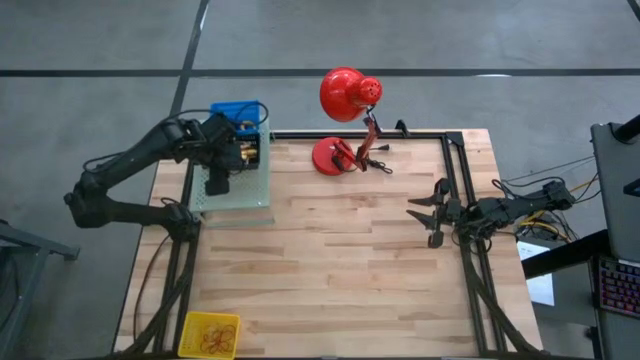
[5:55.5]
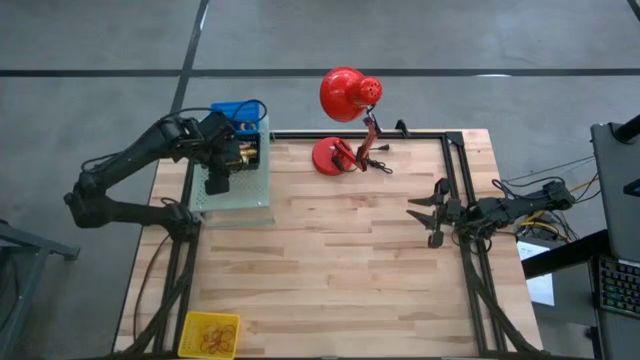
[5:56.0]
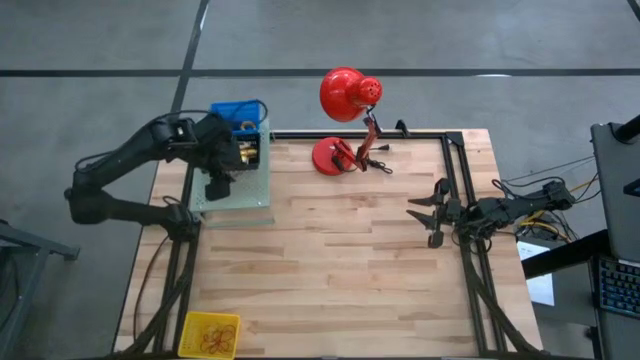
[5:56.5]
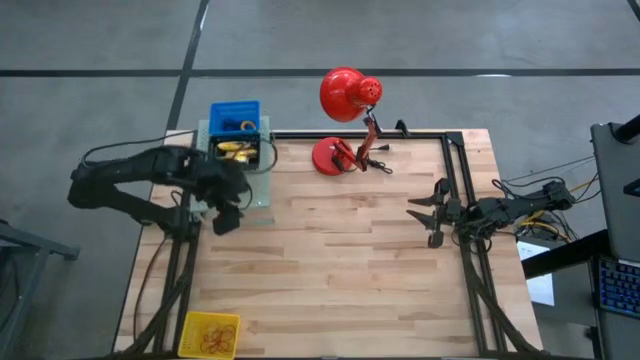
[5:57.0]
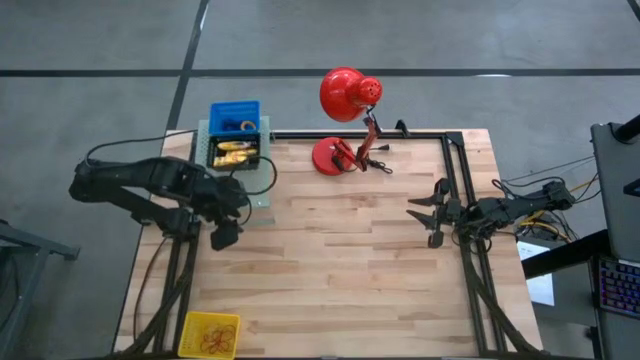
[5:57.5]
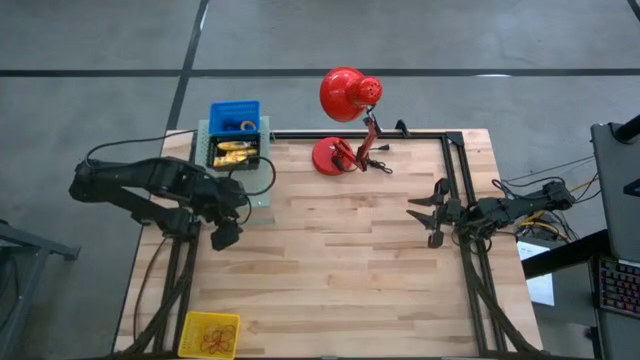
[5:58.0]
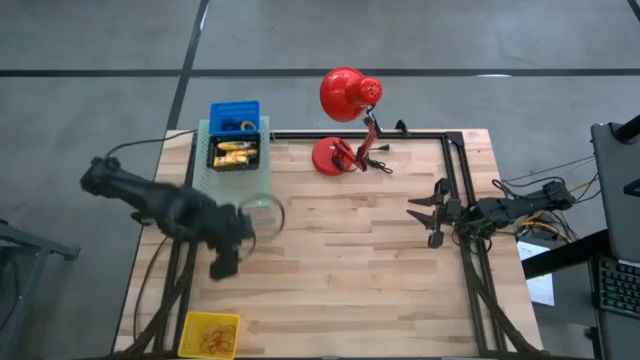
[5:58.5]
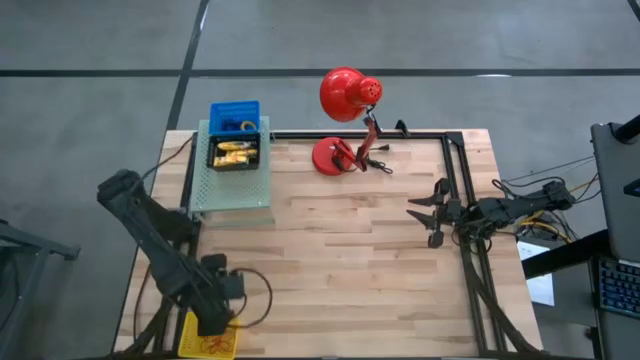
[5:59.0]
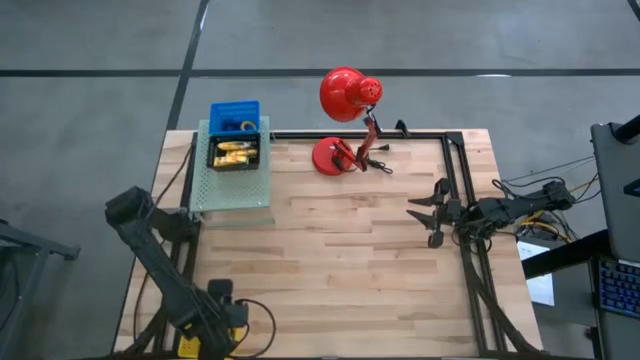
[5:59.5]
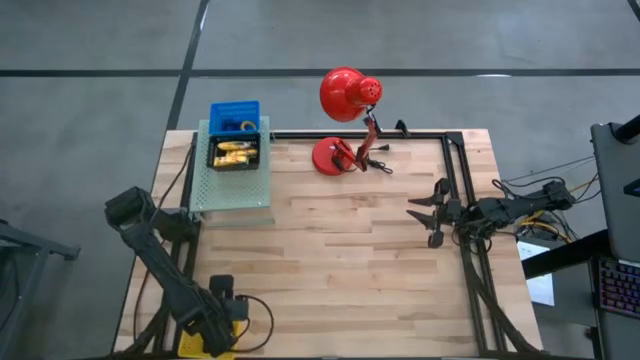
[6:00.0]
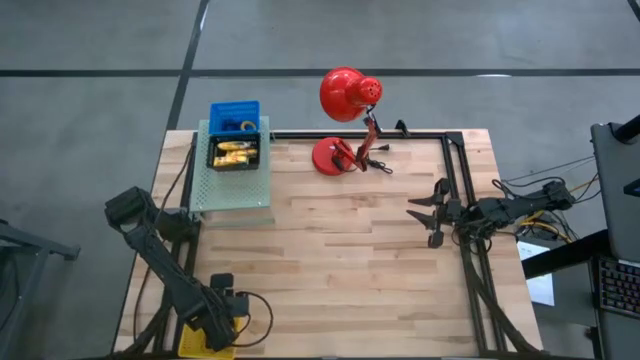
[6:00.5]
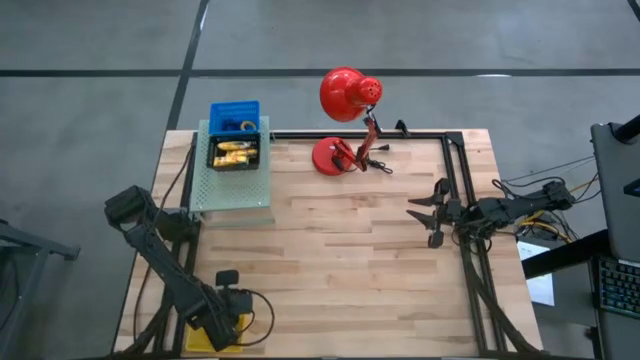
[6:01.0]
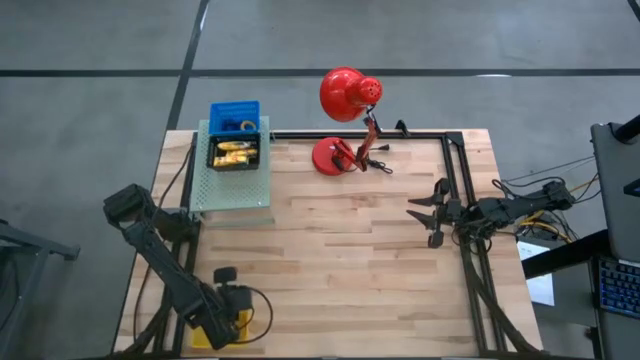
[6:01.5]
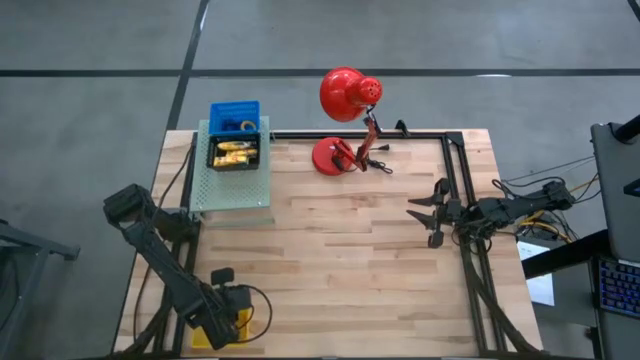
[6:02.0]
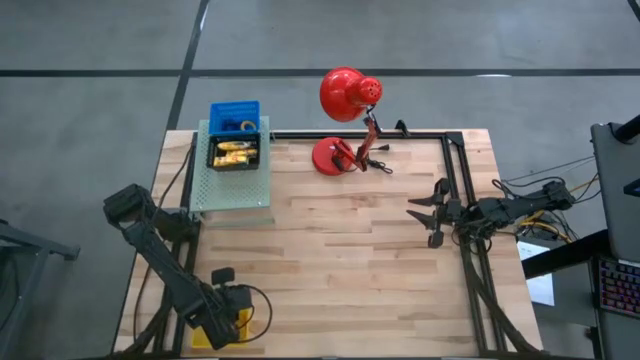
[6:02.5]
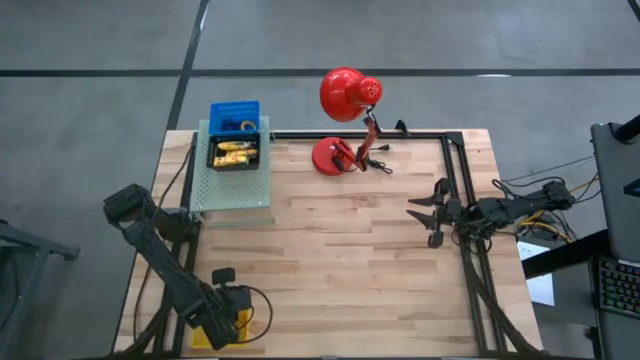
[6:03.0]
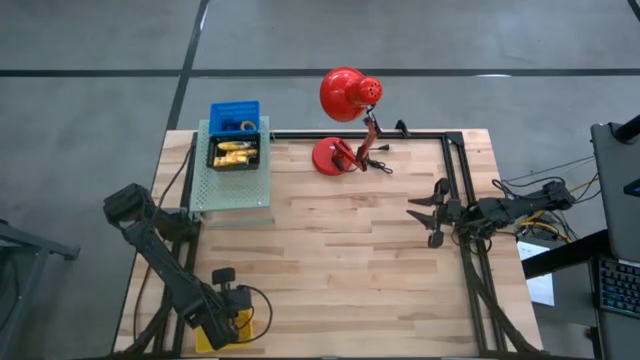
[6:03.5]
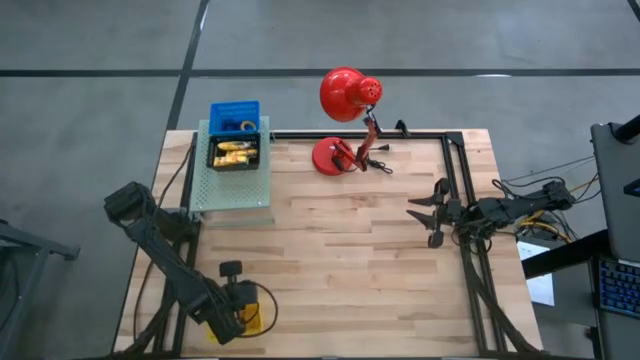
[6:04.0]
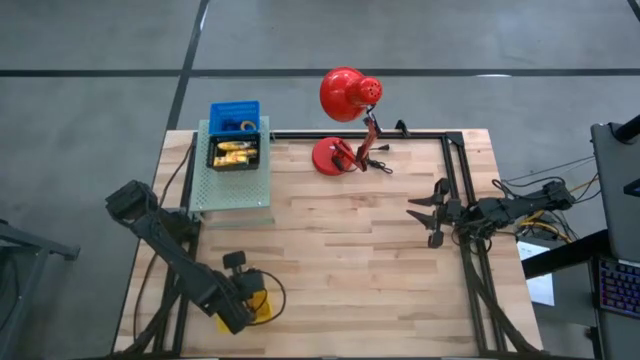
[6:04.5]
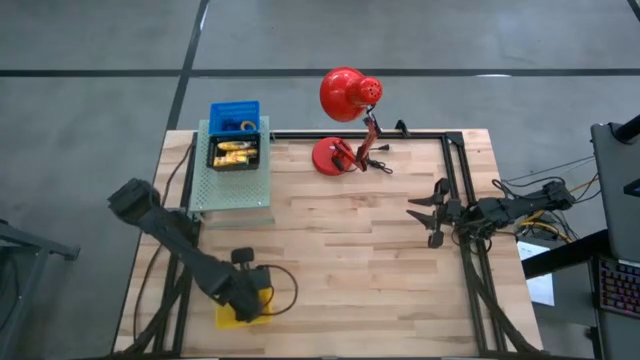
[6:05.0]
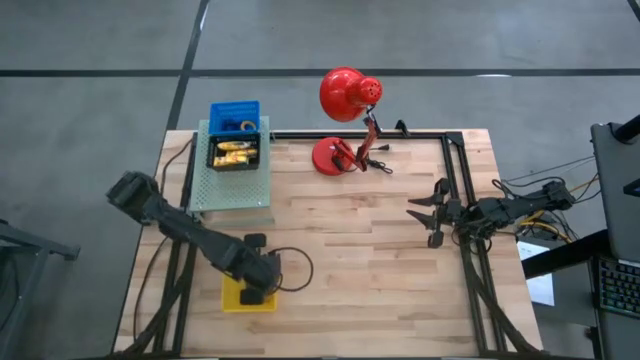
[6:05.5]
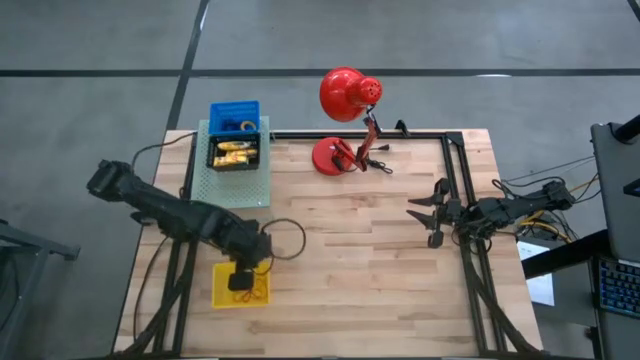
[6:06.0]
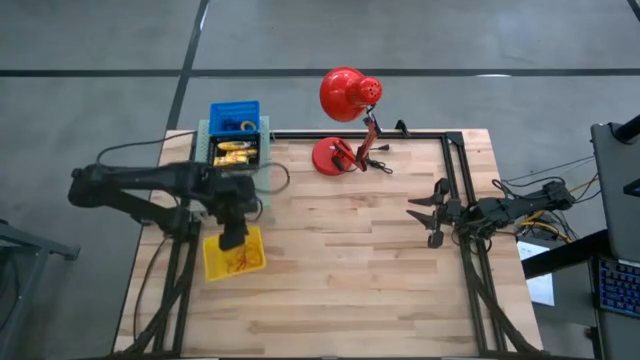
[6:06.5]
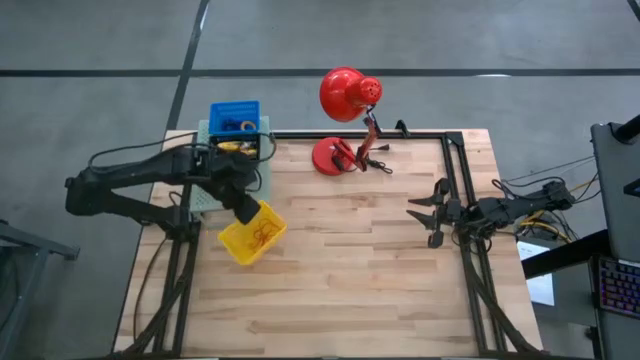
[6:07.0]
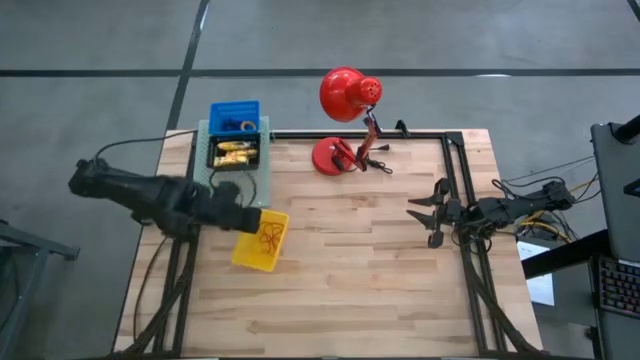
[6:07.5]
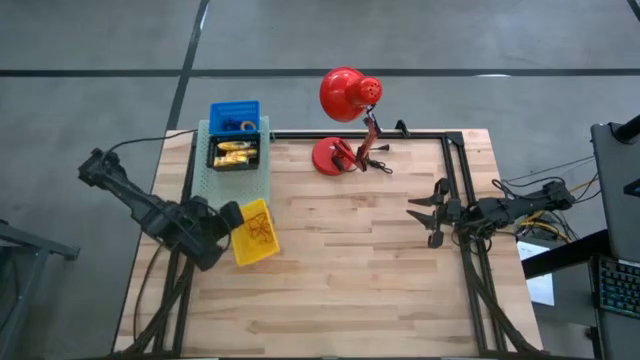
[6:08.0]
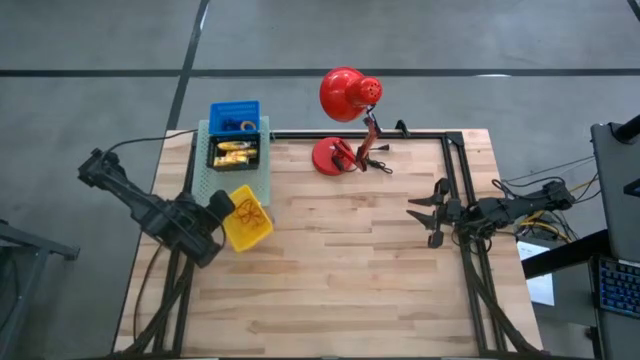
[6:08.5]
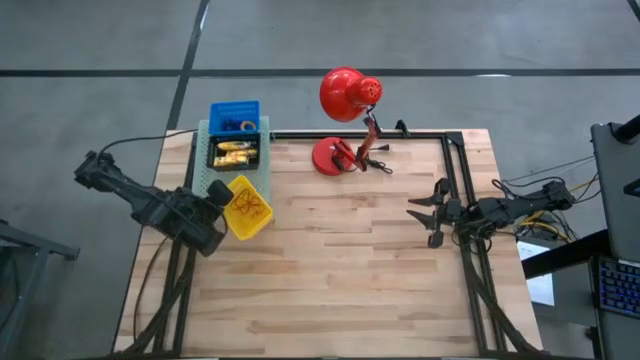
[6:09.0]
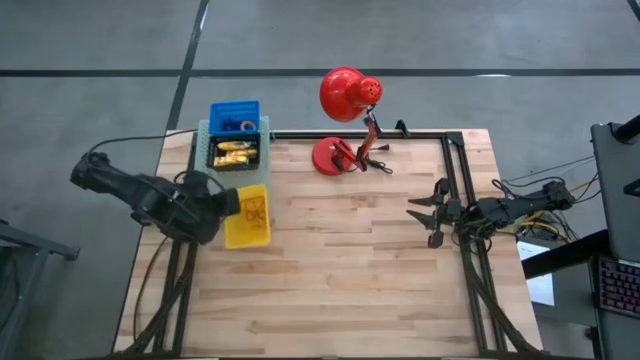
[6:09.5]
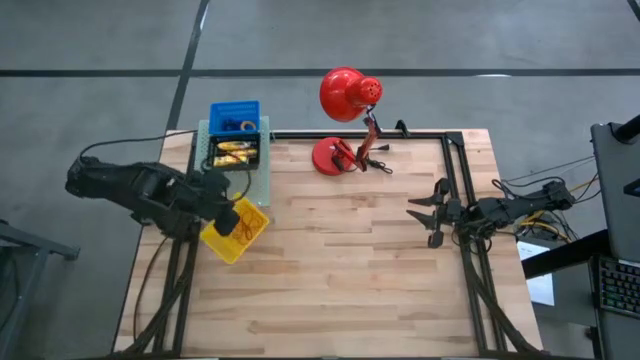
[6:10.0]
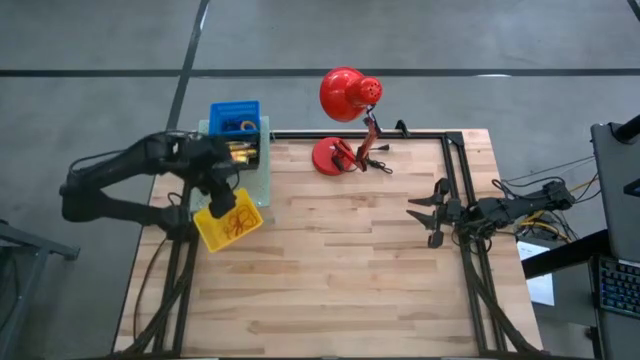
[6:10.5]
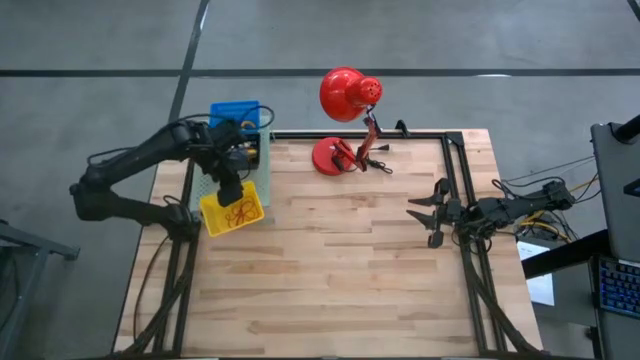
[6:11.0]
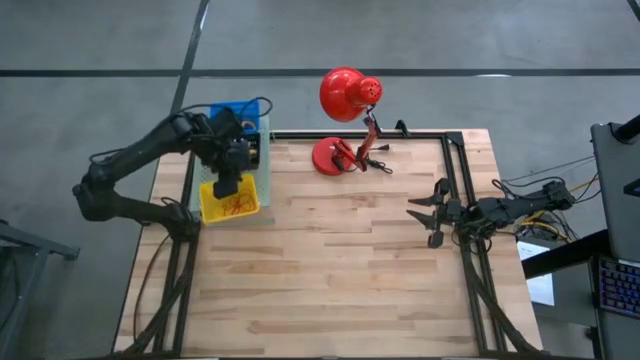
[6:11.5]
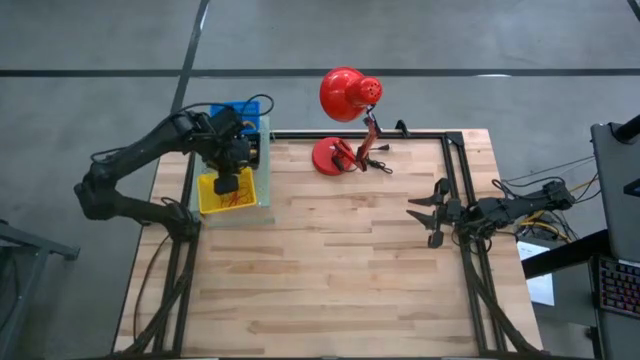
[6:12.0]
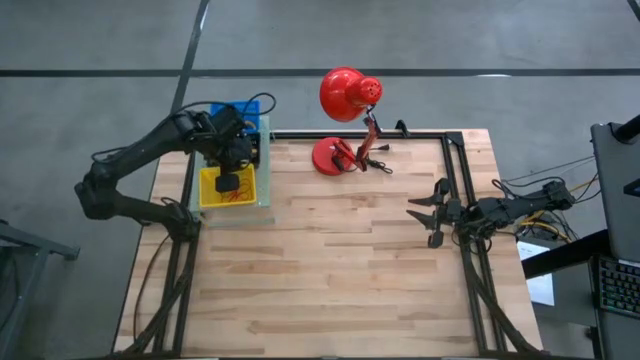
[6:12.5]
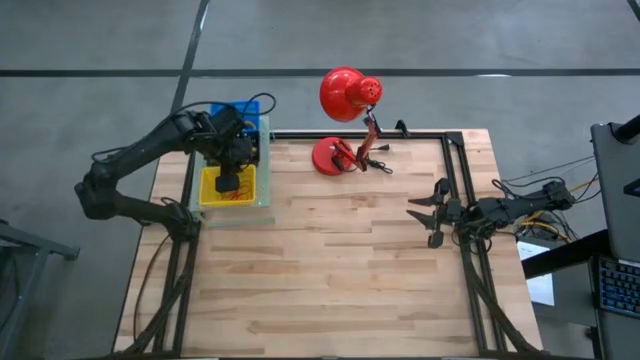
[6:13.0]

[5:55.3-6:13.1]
Task: Pick & Place Office Desk Supplies
Put the yellow bin on the shelf

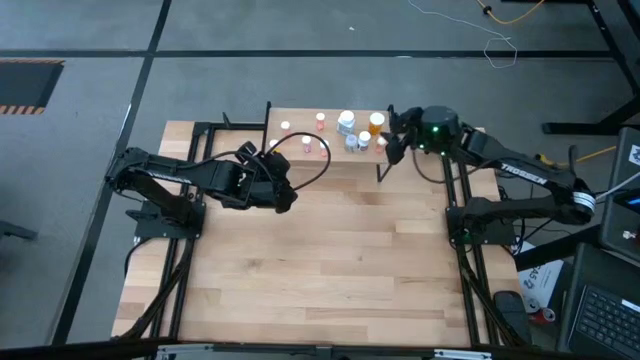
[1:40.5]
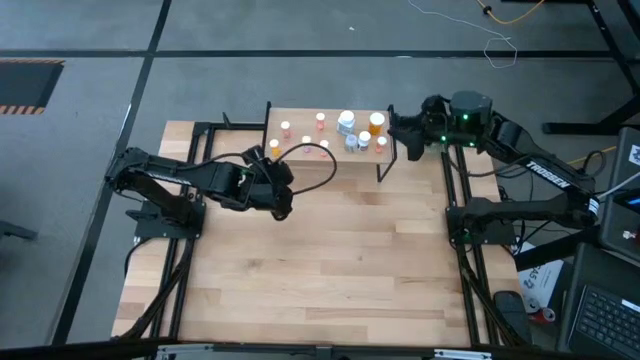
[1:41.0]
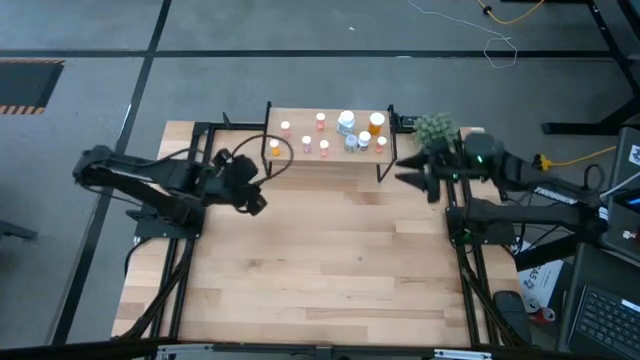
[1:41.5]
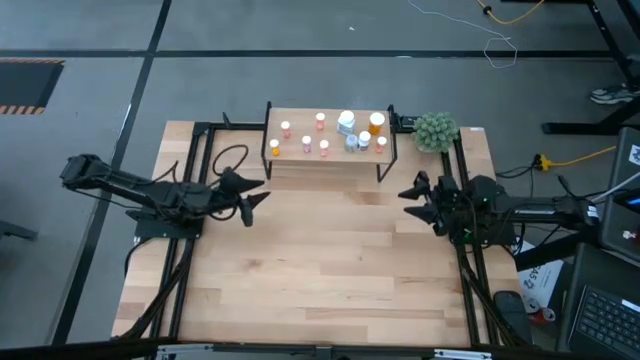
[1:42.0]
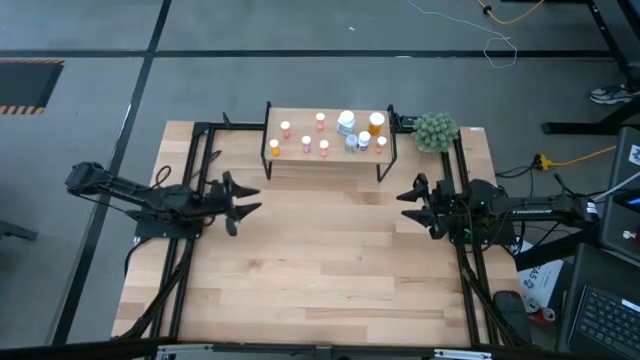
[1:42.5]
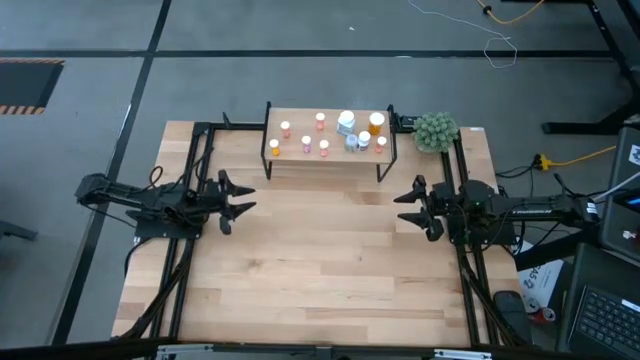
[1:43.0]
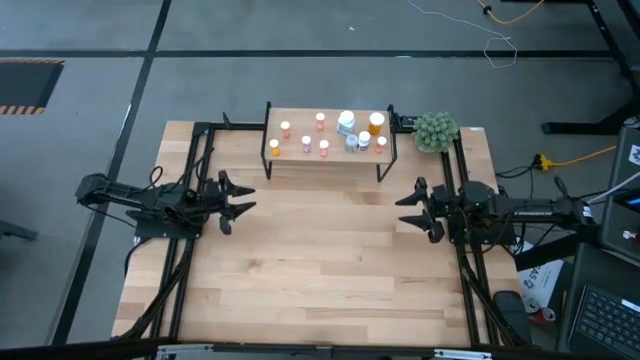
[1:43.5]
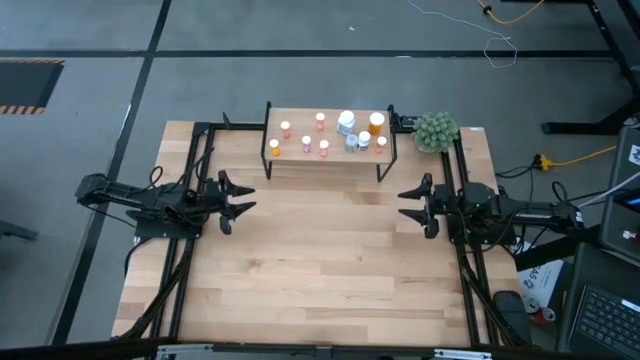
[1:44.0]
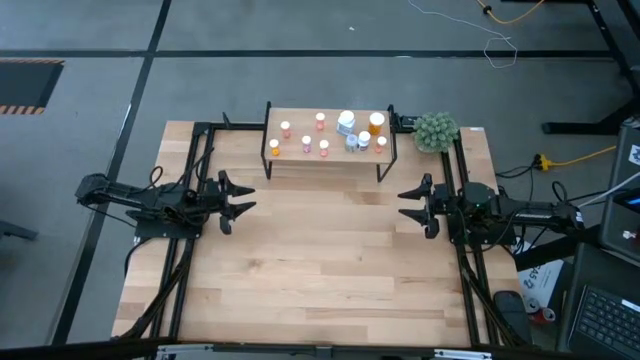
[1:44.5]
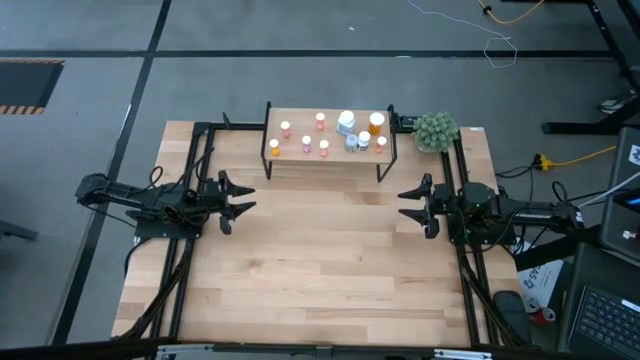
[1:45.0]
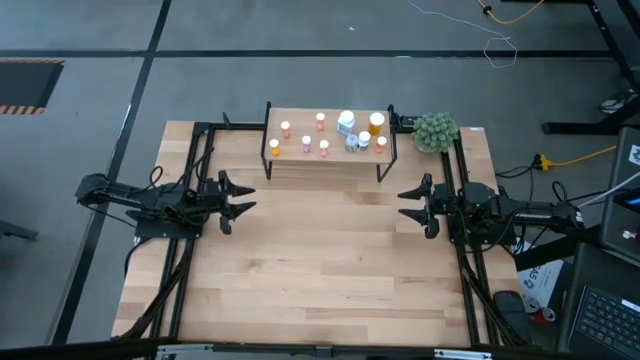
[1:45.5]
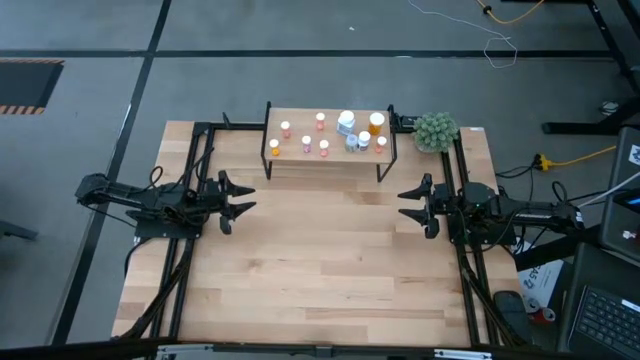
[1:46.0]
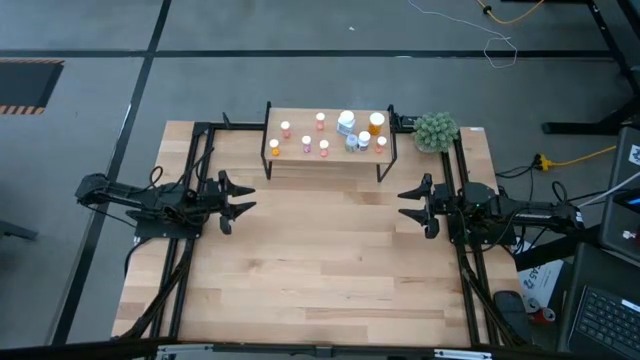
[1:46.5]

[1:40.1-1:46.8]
Task: Pick and place medicine bottles onto shelf by color
Return to Home Position
